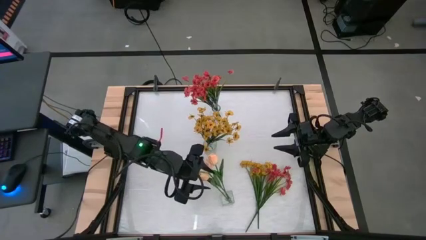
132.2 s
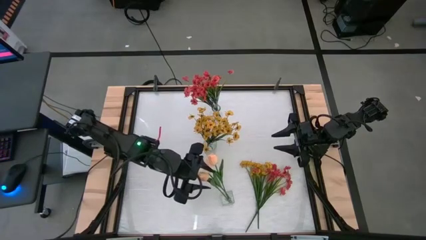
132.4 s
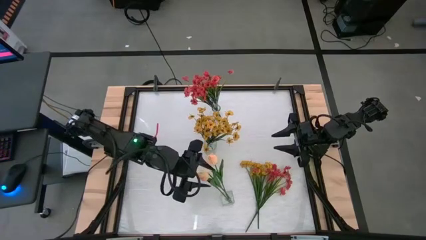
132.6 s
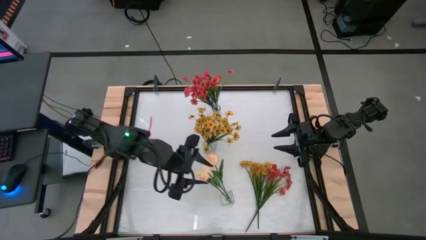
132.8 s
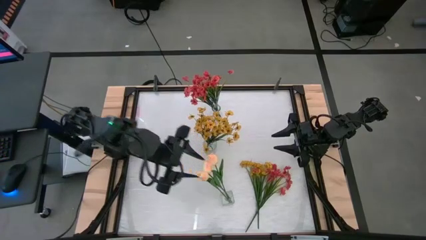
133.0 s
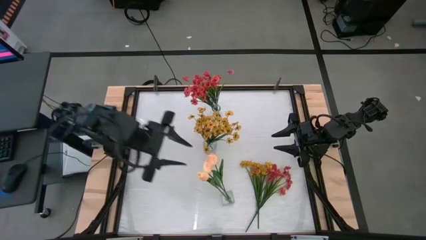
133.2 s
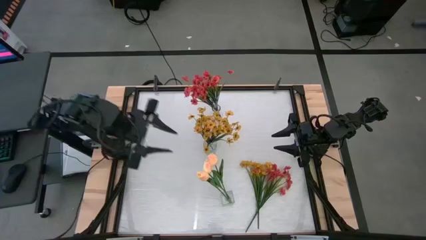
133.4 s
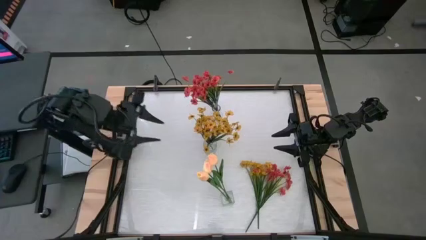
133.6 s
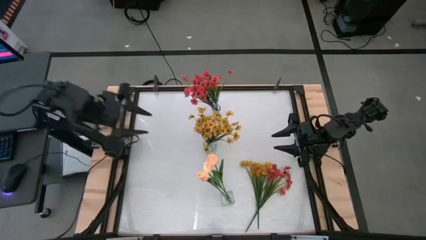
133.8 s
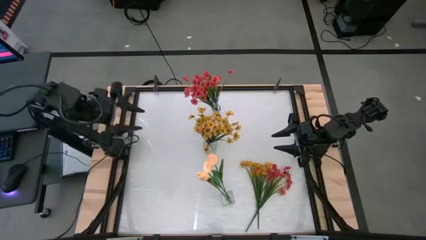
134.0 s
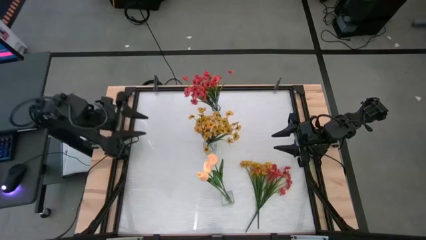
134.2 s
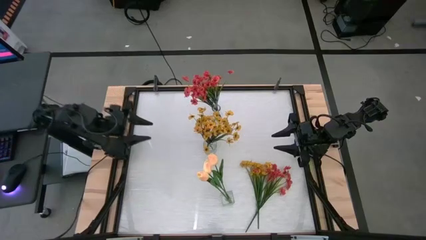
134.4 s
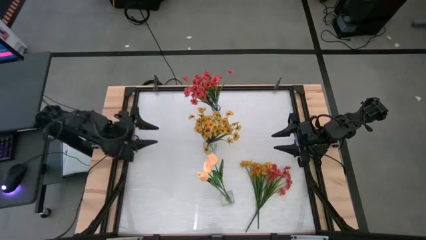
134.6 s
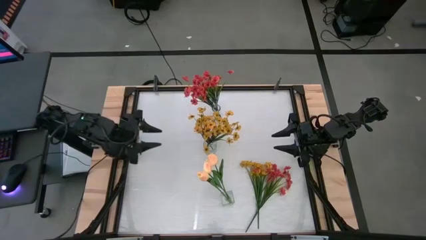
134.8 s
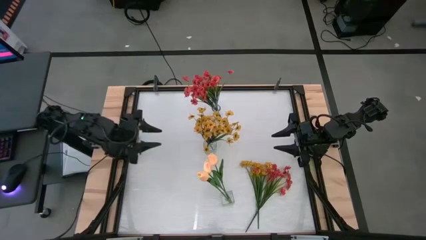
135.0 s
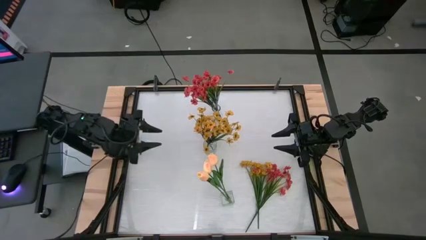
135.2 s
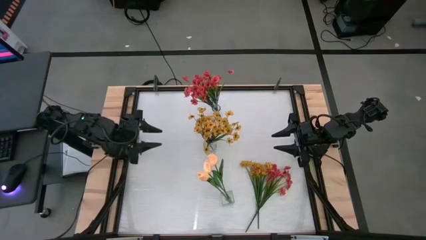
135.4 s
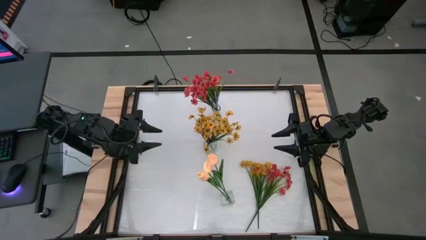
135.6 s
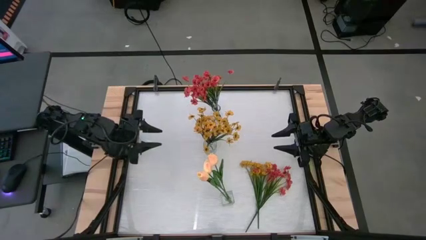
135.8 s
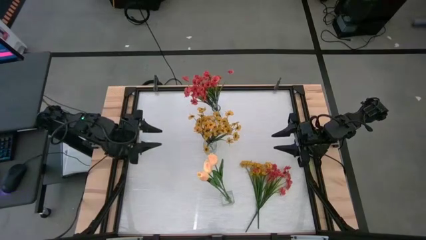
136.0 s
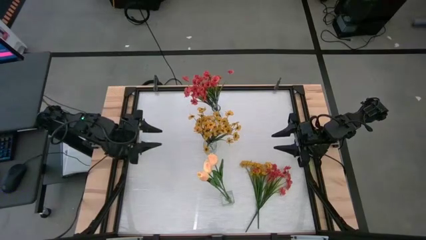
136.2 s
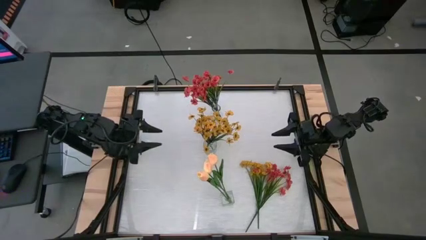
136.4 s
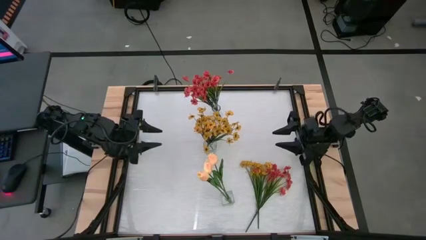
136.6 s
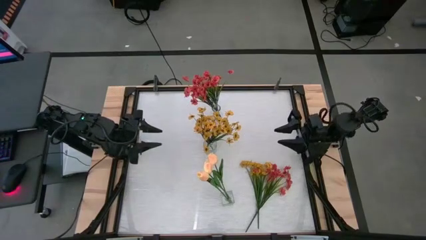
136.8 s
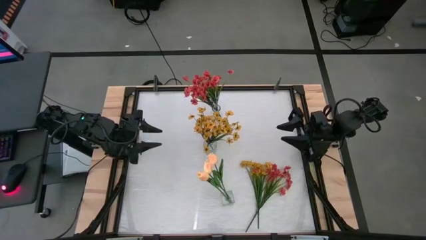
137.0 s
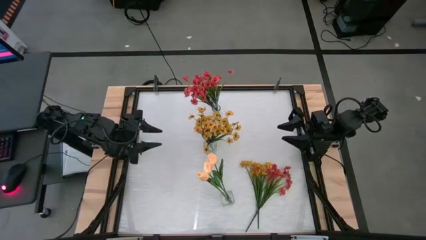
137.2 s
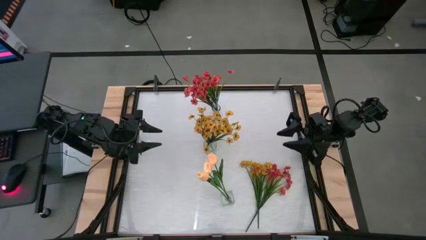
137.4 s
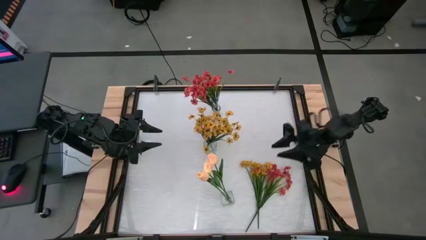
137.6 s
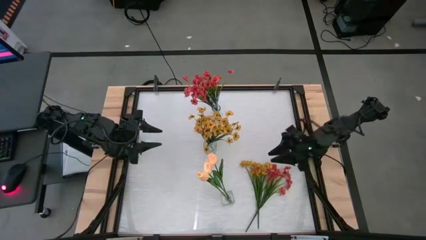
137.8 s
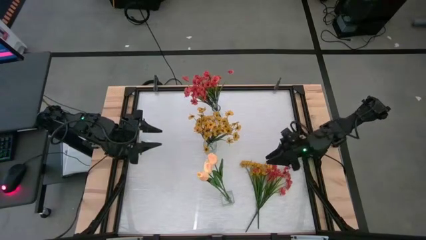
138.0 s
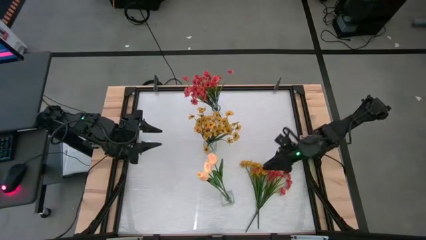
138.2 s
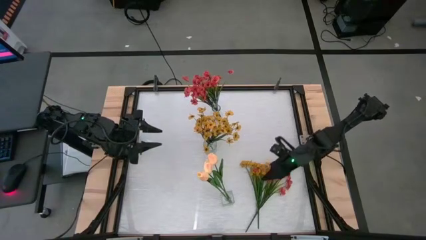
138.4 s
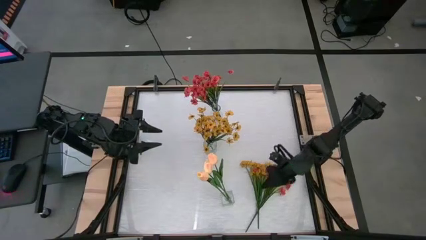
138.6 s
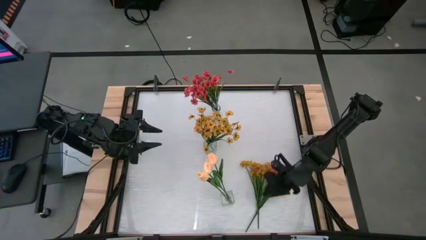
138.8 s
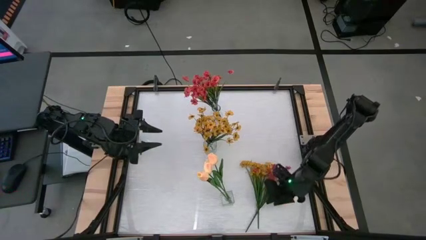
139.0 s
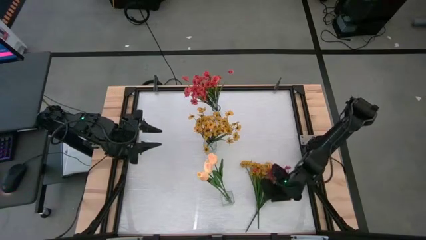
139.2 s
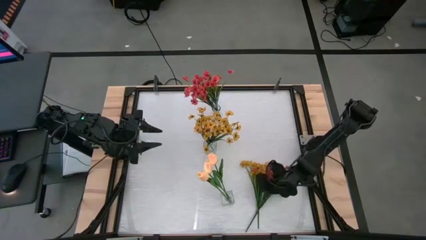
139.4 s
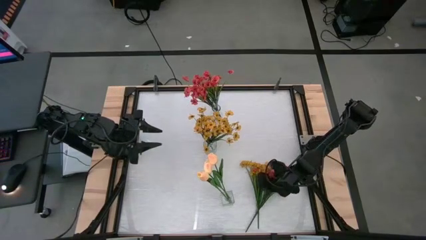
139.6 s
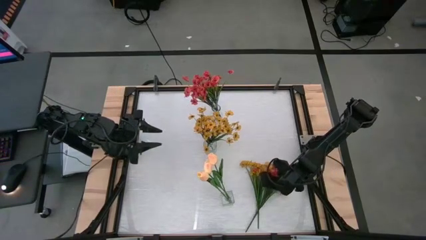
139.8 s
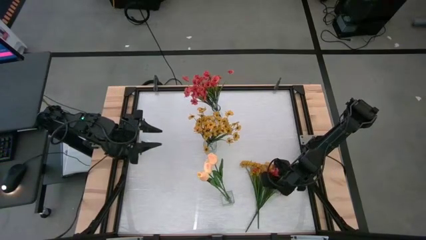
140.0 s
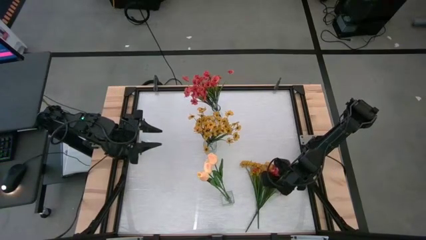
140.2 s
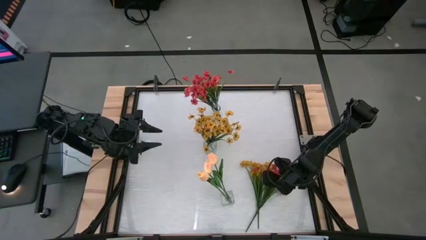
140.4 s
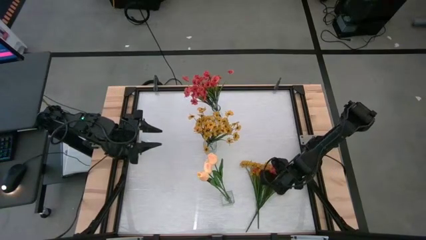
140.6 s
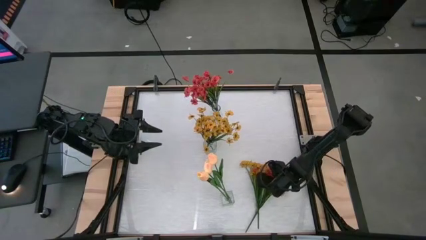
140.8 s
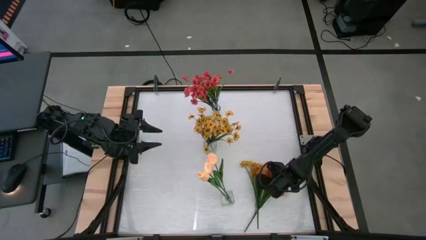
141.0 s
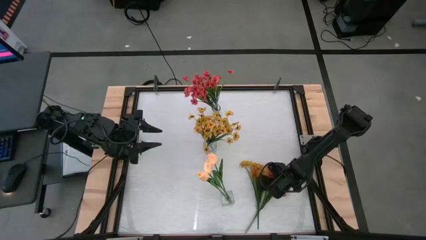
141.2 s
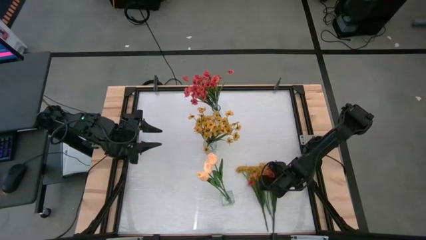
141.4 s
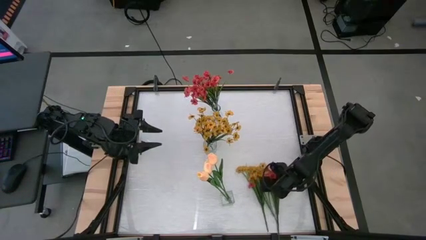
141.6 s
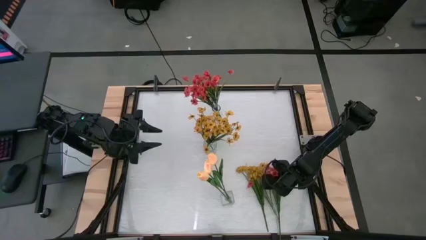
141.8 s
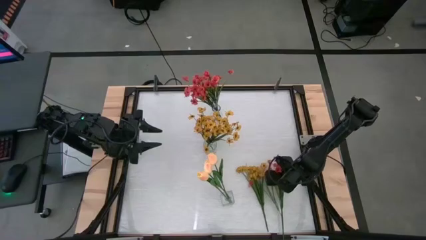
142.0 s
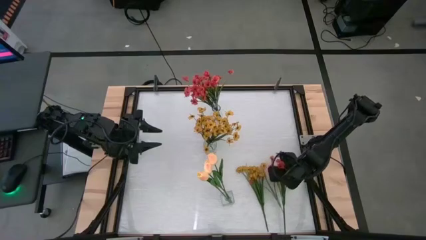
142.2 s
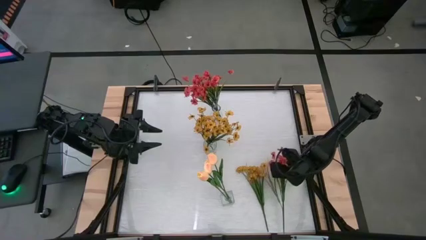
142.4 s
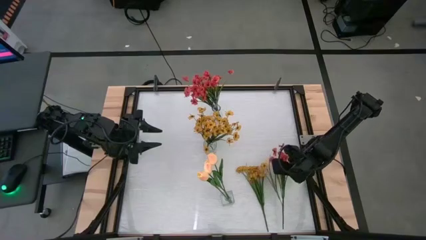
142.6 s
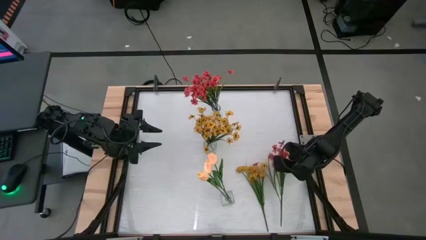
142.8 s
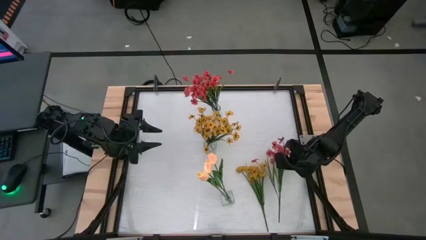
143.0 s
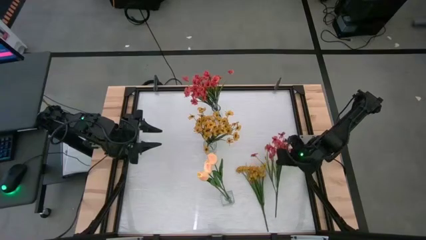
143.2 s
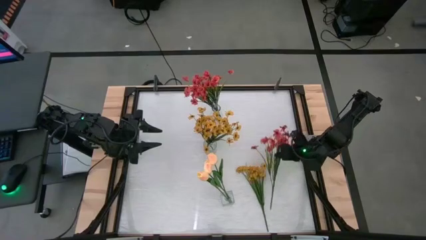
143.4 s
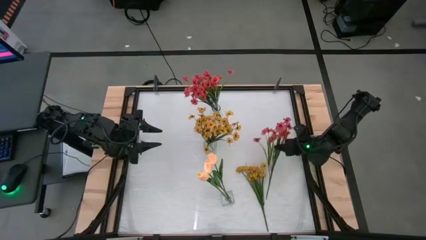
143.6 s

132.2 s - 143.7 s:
Task: Sort flowers into vase by color
Put the red flowers into the top transparent vase

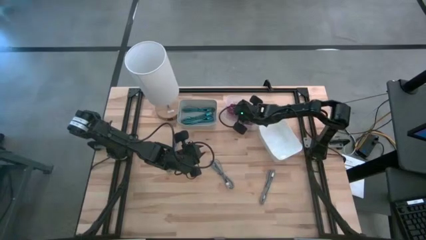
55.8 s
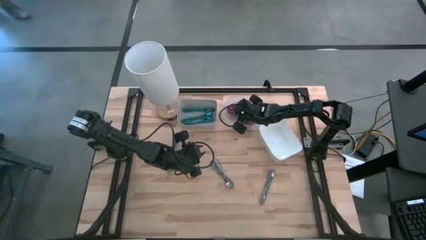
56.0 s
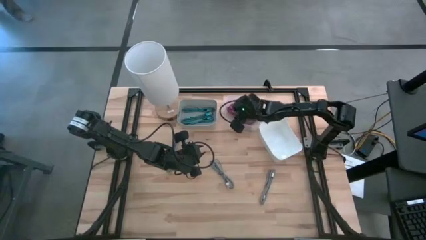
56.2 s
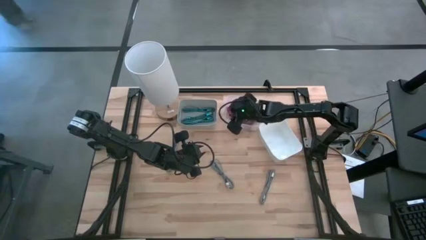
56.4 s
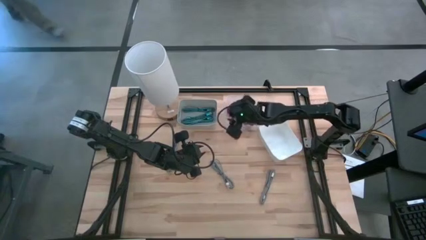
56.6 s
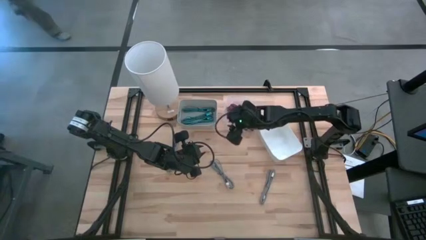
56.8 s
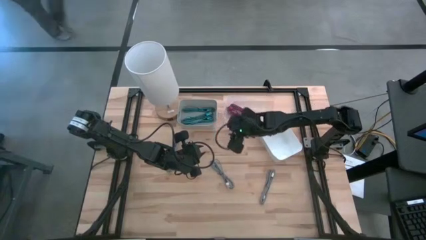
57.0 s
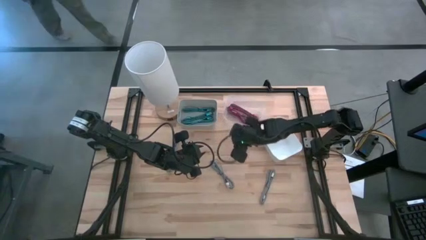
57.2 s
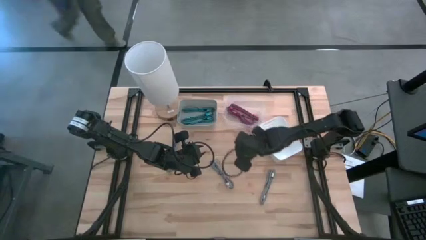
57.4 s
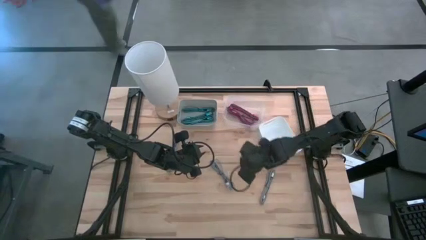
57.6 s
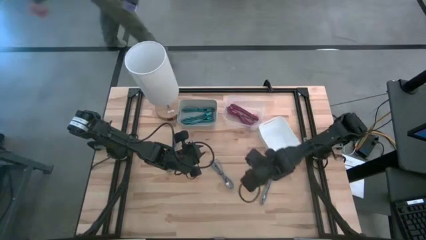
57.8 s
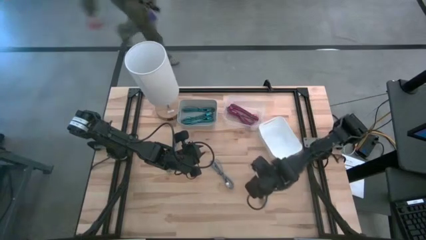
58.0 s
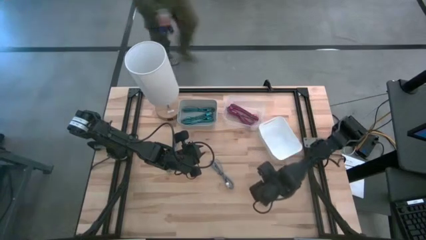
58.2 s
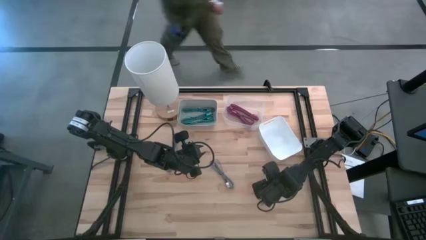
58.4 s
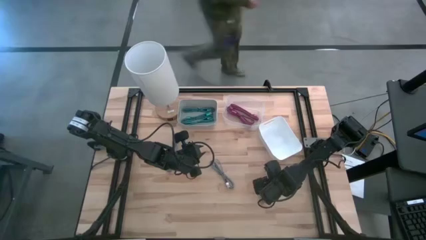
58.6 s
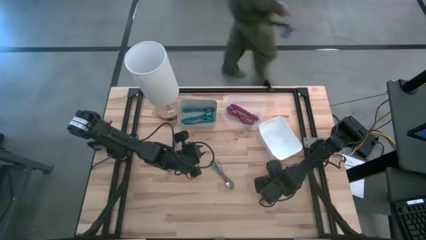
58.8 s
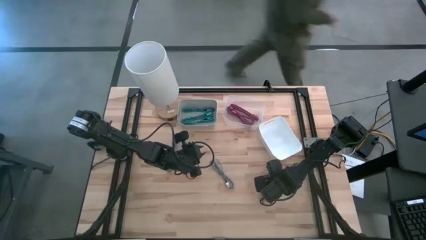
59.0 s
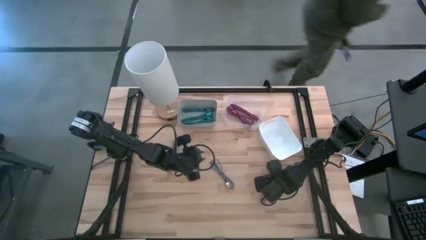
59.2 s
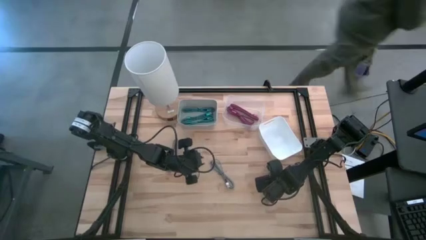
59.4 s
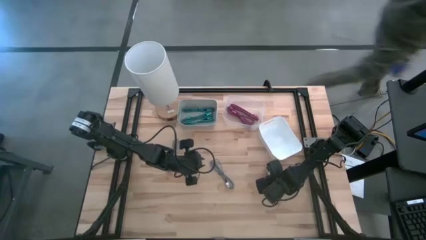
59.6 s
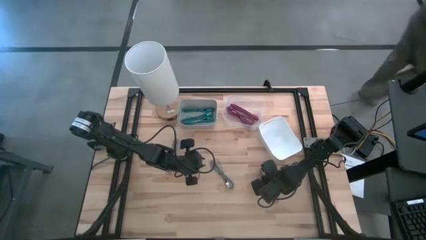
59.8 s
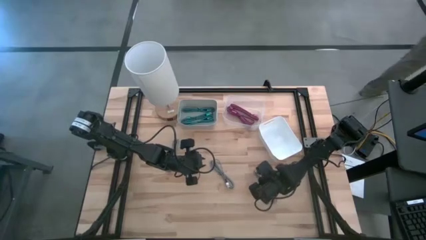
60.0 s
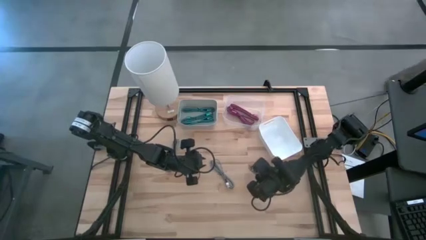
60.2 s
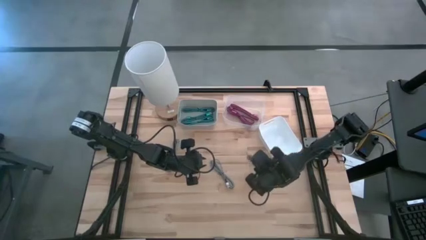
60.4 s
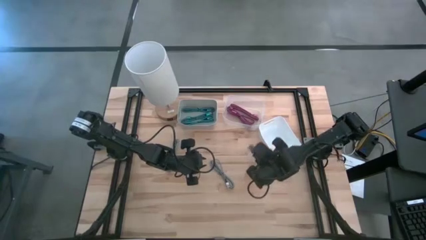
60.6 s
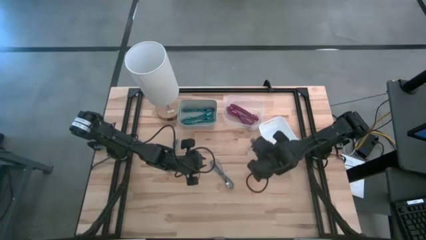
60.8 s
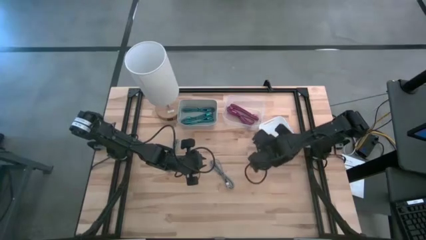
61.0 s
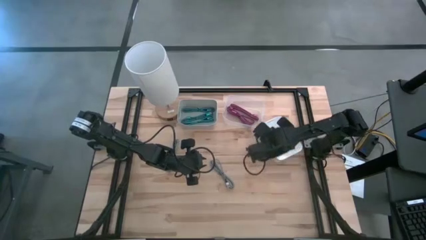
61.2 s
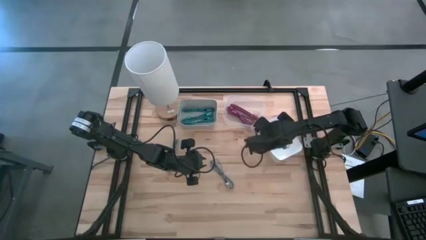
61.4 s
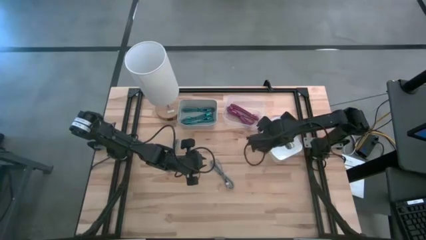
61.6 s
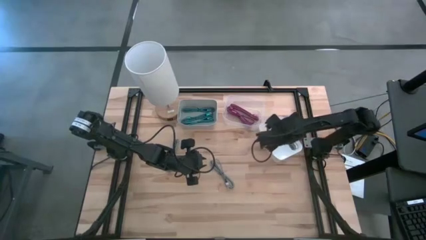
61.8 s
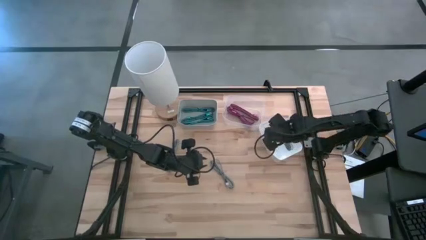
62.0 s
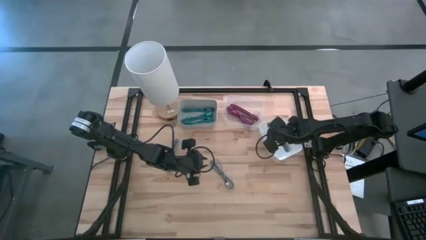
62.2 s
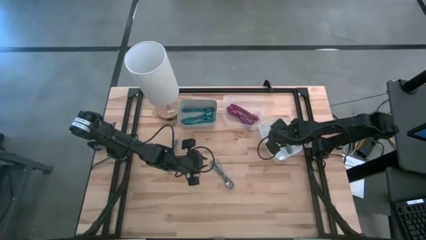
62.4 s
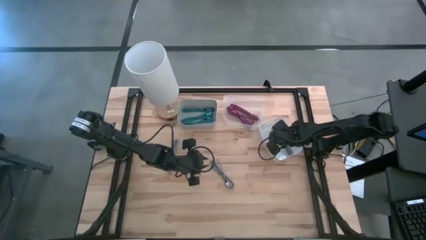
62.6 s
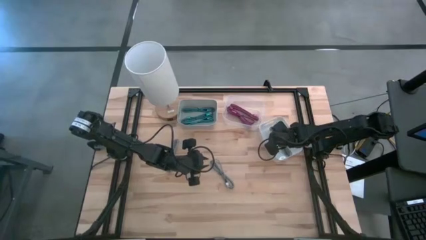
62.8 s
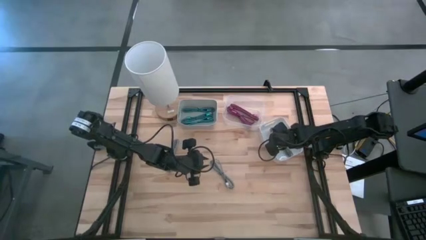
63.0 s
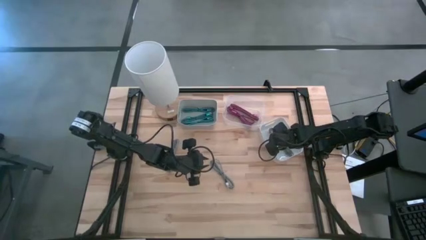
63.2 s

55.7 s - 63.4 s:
Task: Pick & Place USB Port
Put the right black and white USB cable into the white bin
